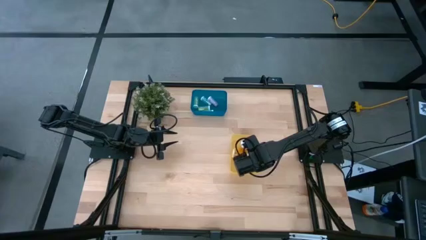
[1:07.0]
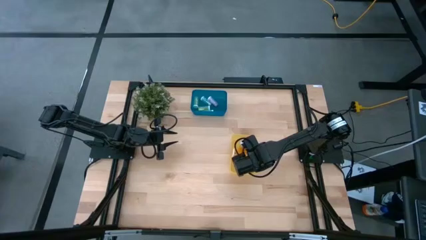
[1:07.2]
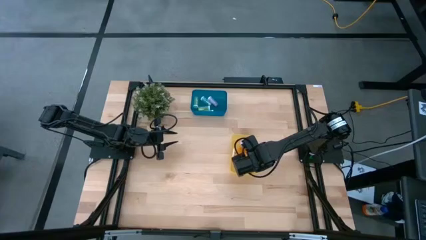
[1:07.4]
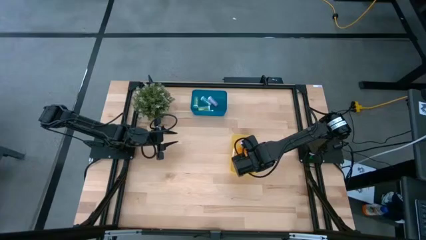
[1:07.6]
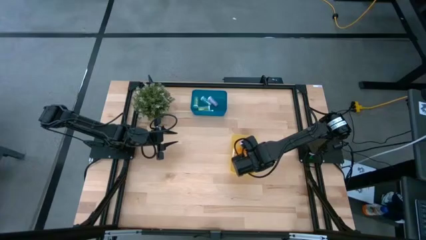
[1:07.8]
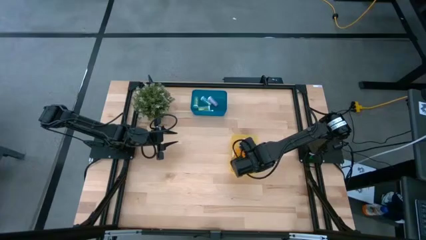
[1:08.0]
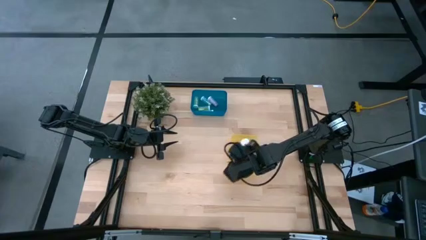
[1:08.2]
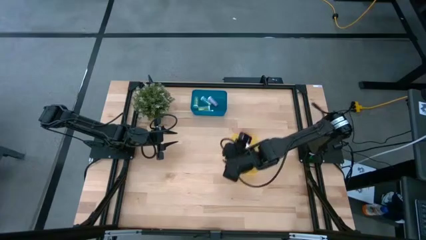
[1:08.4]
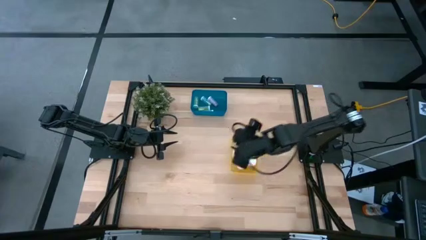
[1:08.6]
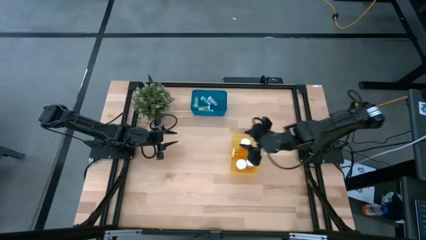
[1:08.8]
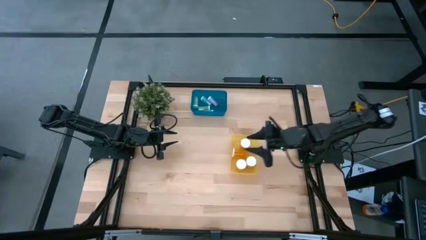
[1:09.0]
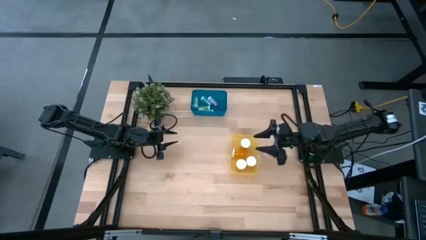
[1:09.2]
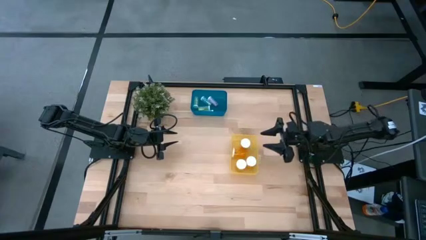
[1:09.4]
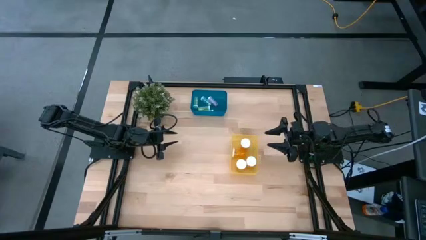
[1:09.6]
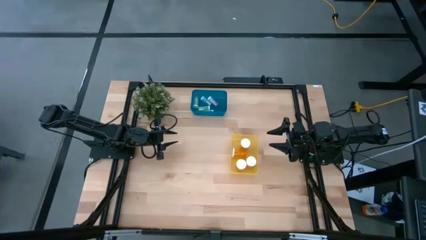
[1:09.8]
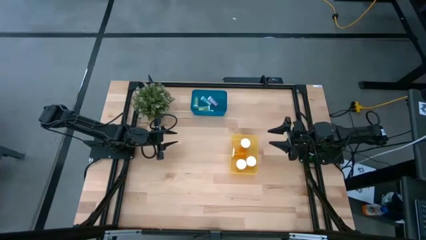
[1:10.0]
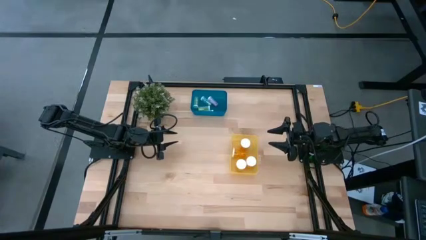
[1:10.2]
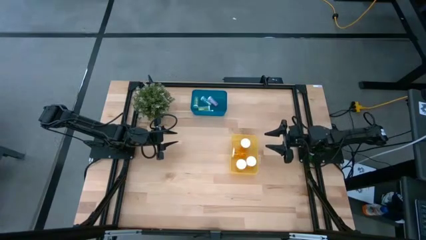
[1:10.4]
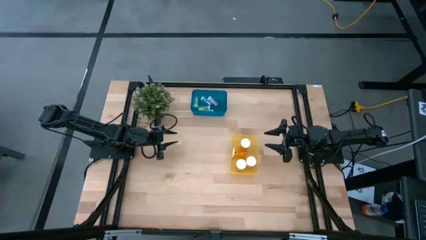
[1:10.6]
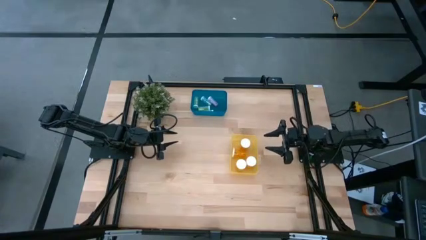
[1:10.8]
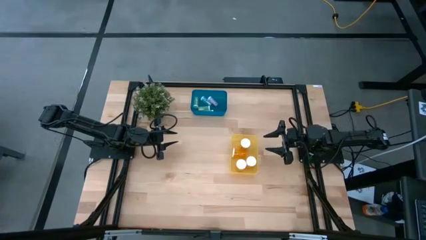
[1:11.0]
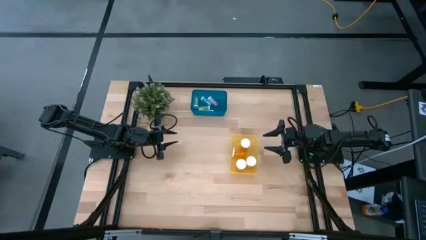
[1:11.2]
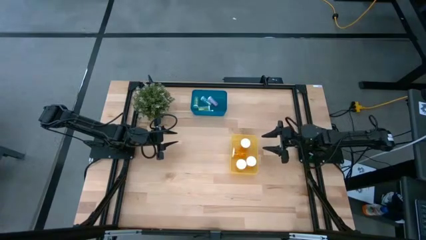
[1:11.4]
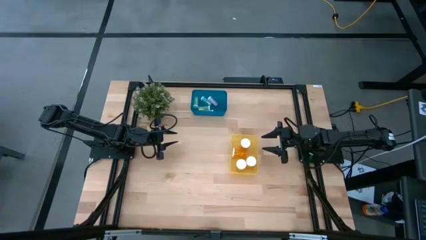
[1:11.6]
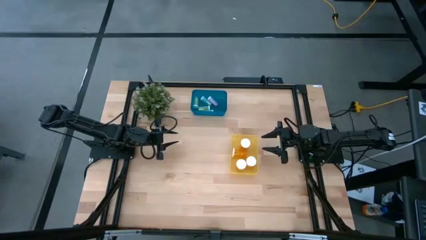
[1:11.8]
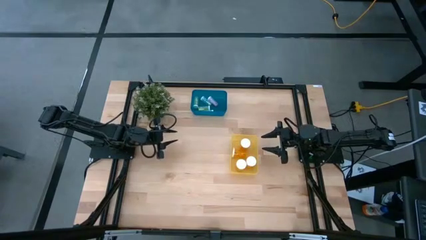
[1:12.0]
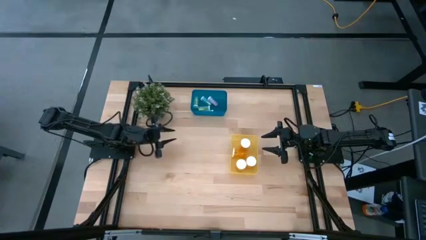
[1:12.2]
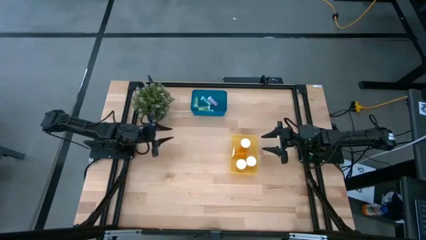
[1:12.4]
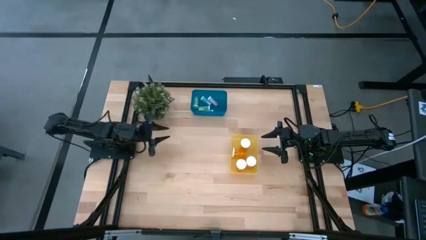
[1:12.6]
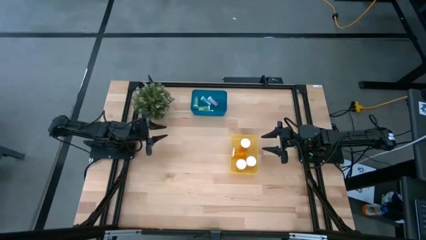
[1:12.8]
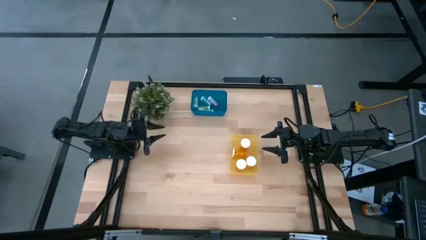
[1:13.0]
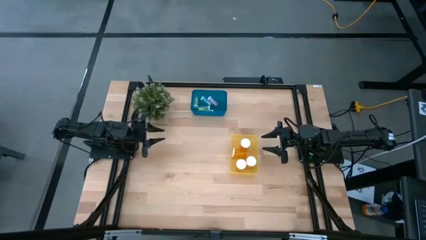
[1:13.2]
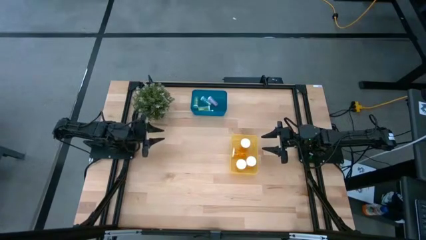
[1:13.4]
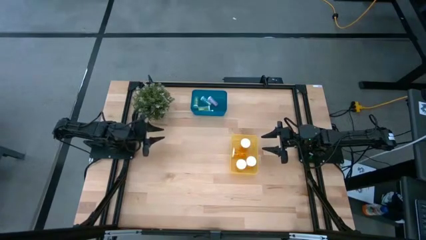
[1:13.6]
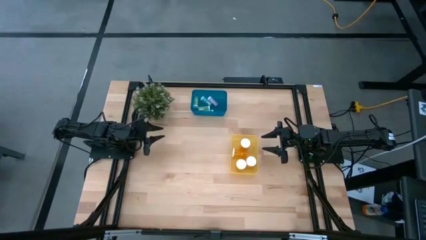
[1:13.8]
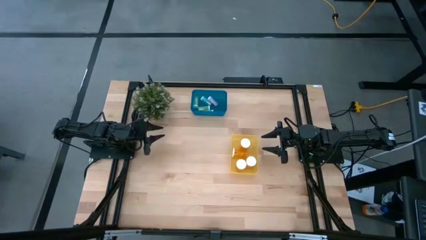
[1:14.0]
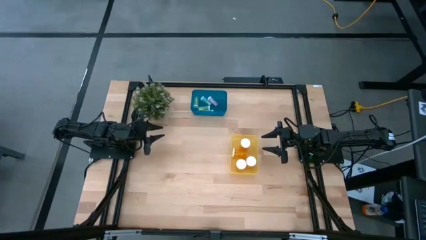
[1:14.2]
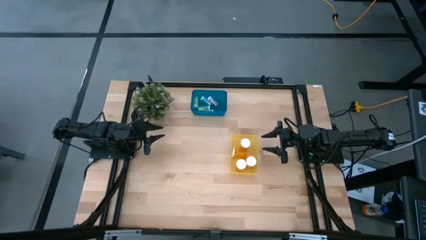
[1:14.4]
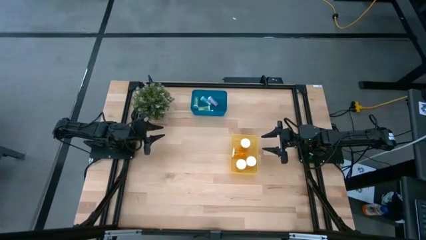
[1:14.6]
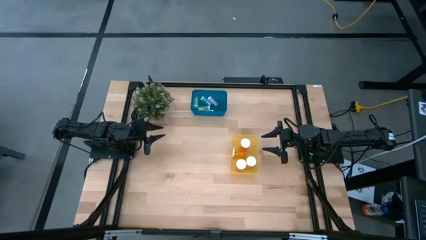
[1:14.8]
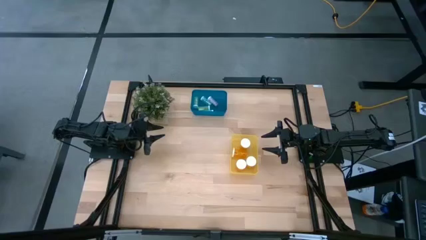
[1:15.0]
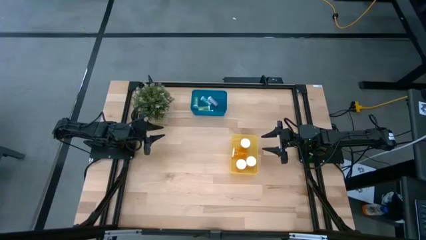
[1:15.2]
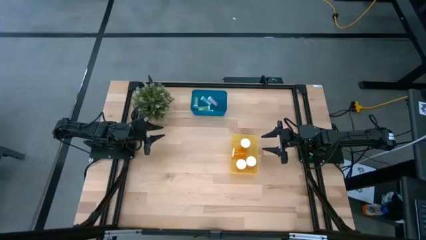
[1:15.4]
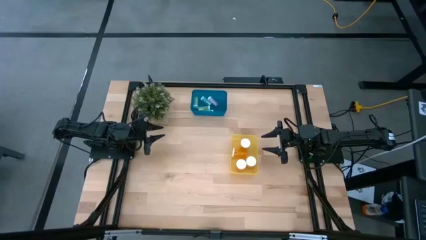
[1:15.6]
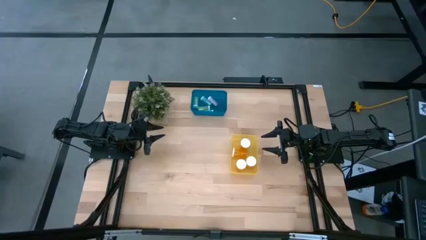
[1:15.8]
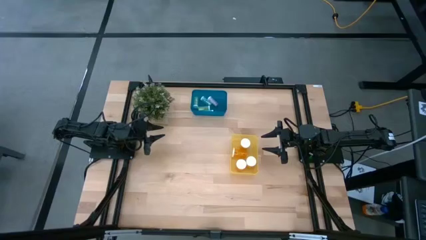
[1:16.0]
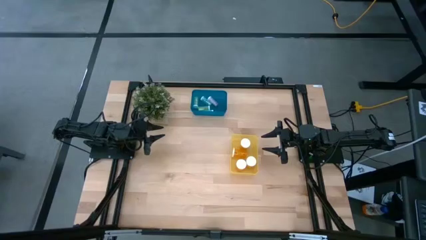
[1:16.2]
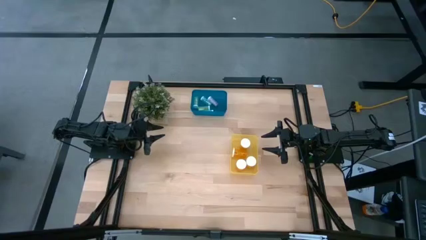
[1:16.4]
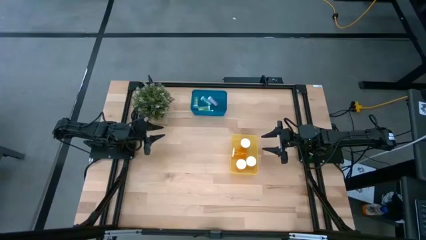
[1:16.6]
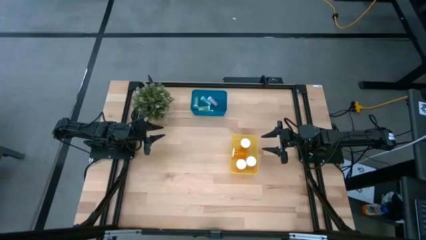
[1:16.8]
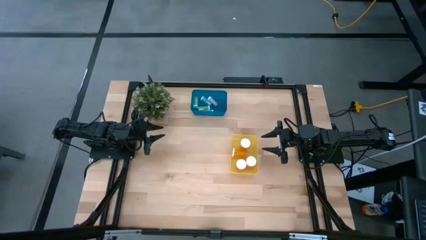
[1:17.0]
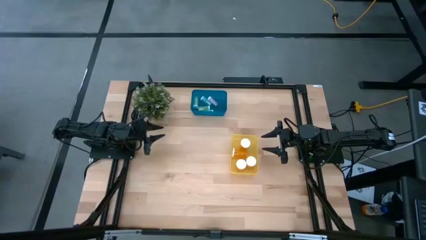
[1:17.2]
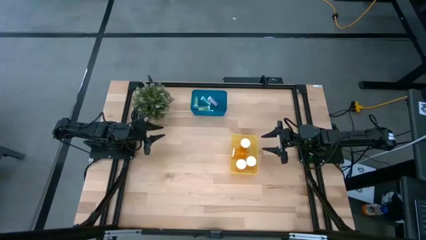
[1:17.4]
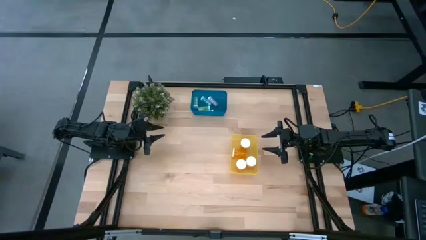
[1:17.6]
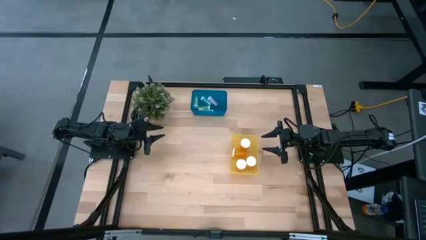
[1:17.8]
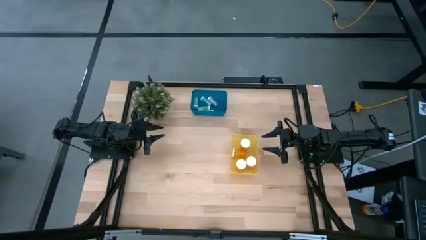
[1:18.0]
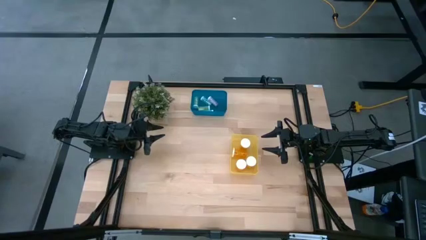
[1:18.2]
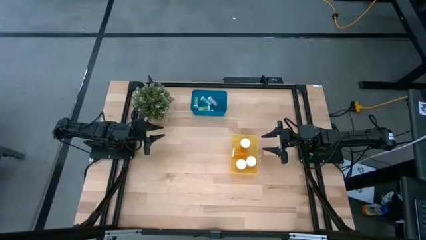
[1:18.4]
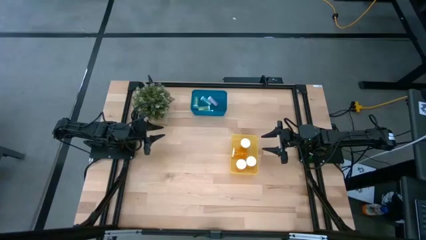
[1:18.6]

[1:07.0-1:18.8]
Task: Pick and place medicine bottles into bin by pill shape (circle, oval)
Return to Home Position

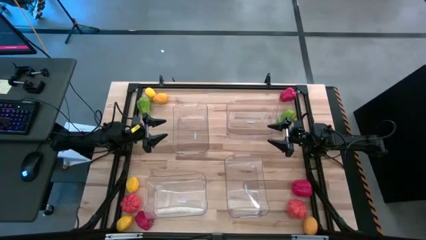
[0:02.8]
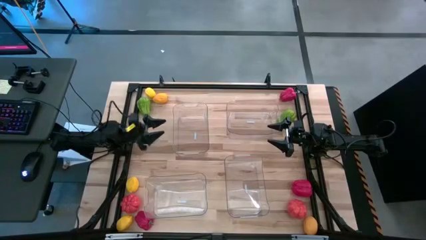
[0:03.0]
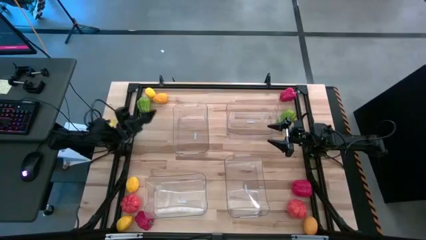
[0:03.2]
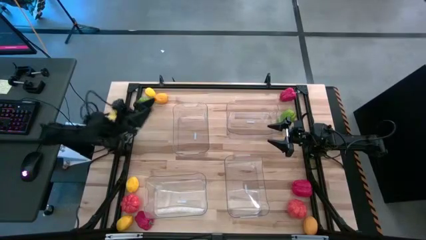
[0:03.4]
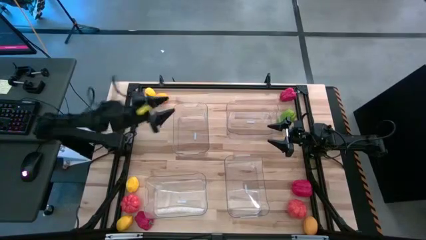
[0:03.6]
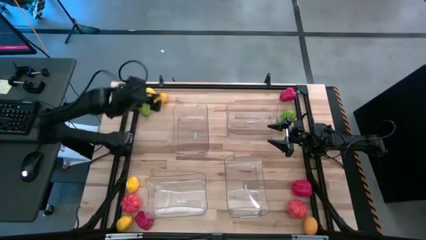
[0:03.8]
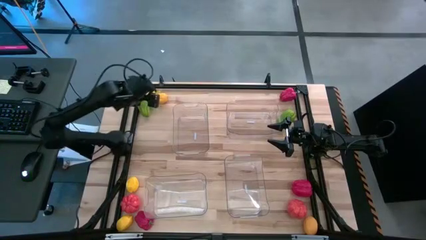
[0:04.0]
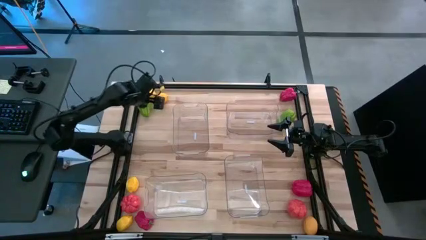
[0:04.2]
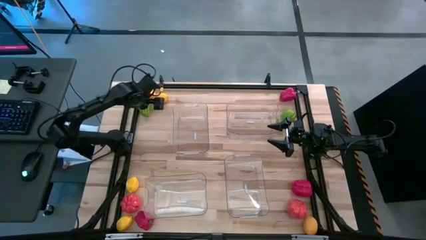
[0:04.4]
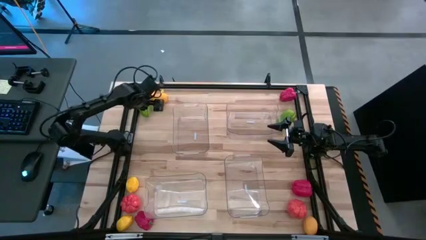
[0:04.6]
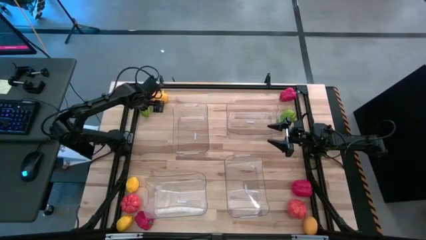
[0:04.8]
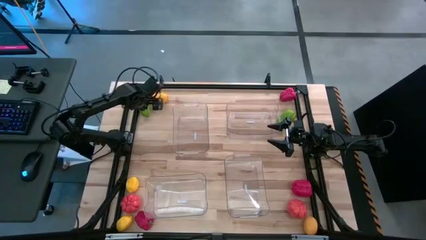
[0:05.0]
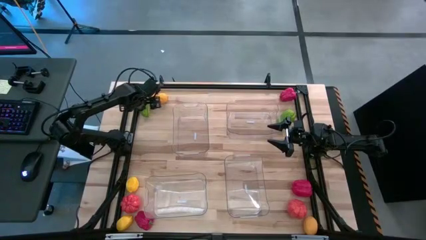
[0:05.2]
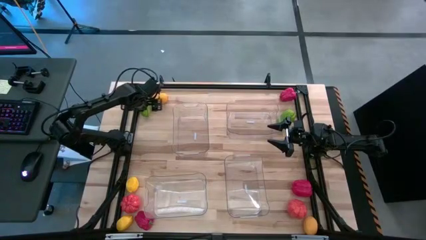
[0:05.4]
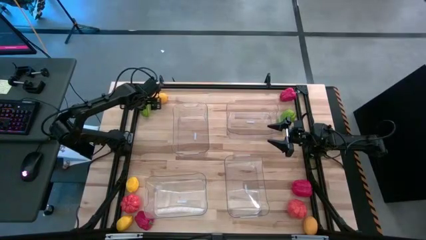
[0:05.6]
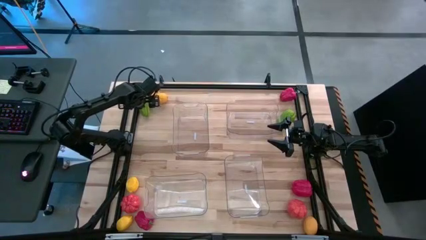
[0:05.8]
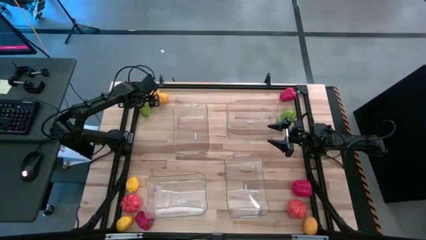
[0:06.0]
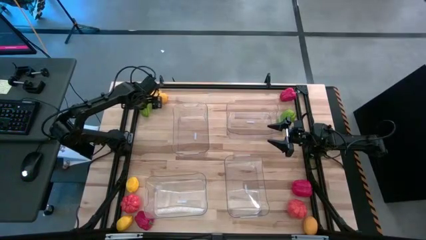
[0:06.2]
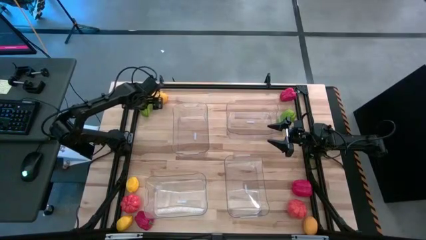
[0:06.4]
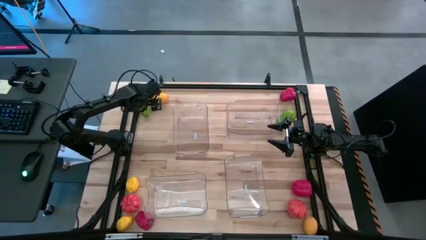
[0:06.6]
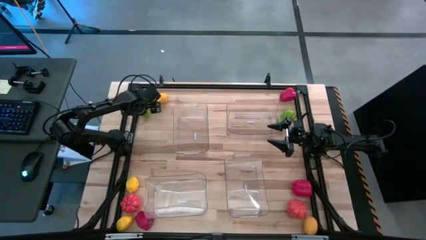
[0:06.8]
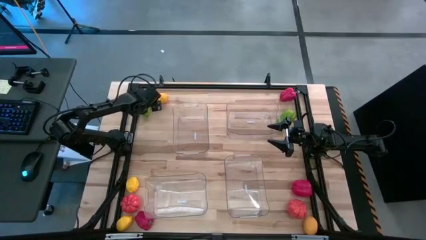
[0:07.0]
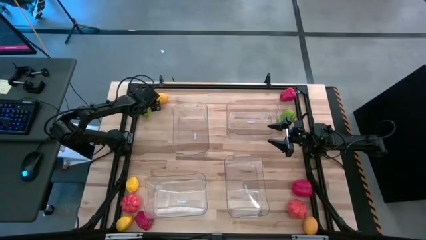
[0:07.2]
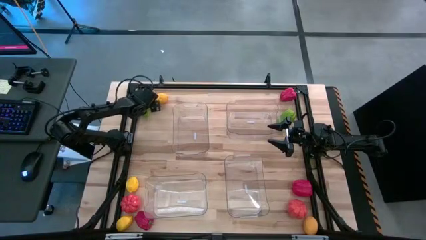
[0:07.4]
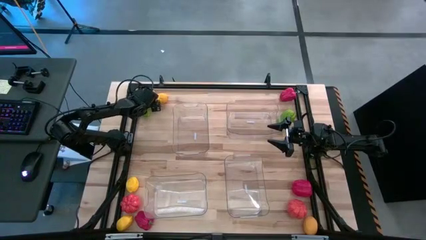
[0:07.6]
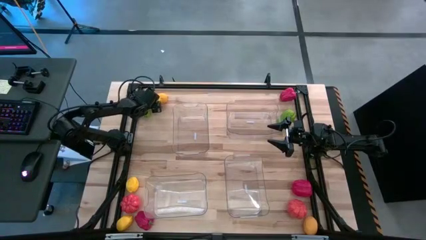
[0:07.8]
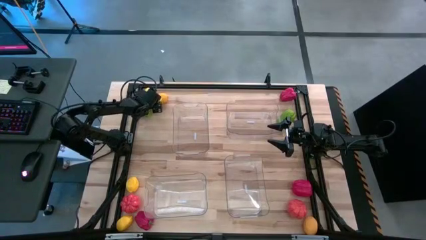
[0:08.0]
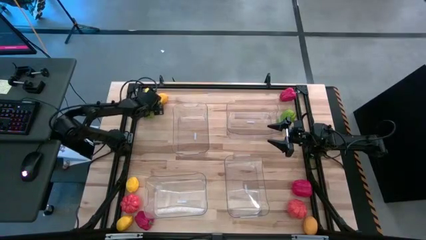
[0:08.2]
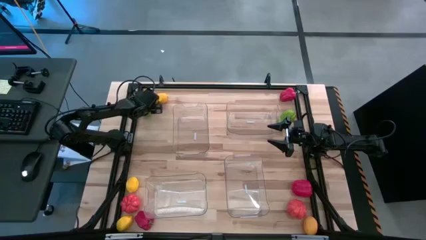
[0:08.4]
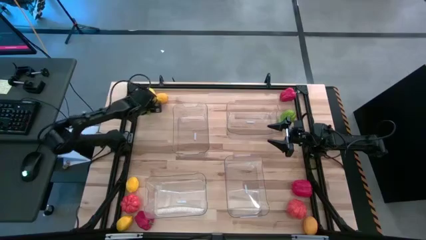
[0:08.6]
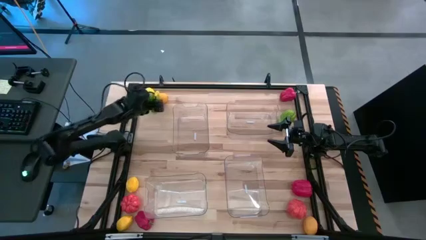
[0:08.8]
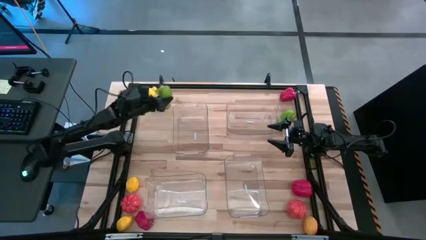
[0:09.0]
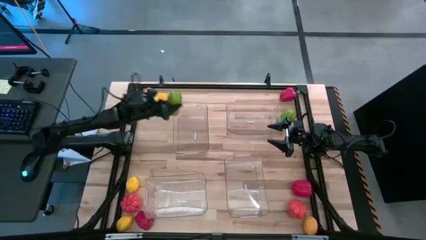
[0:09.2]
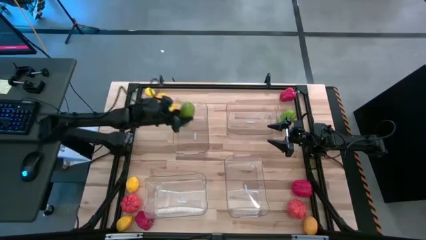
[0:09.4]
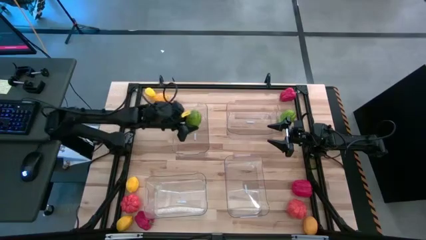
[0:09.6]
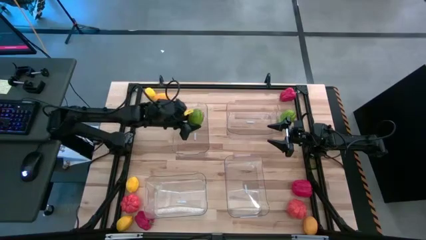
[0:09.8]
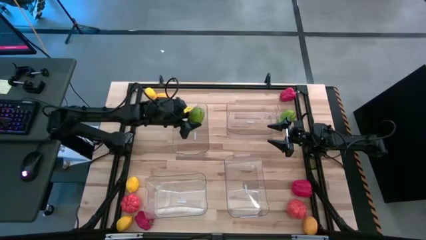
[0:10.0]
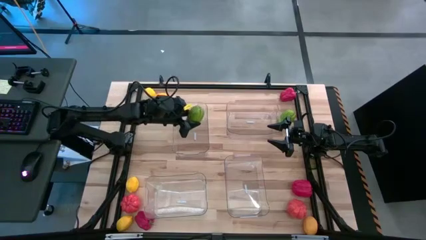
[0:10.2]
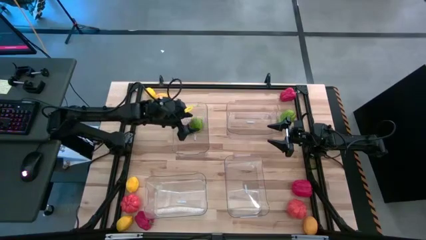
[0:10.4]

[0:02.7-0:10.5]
Task: Sort produce into baskets
Put the left green chayote into the top left transparent bin
